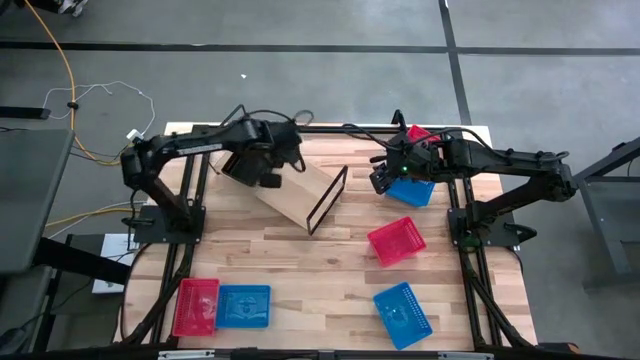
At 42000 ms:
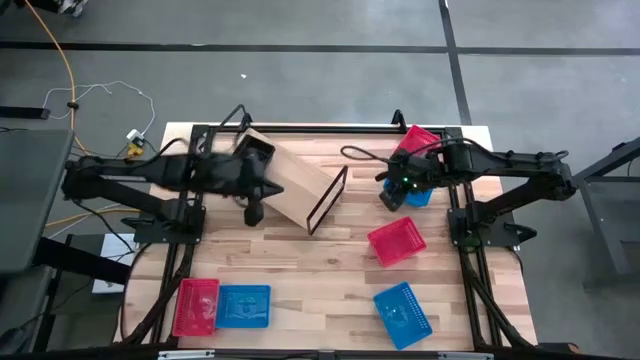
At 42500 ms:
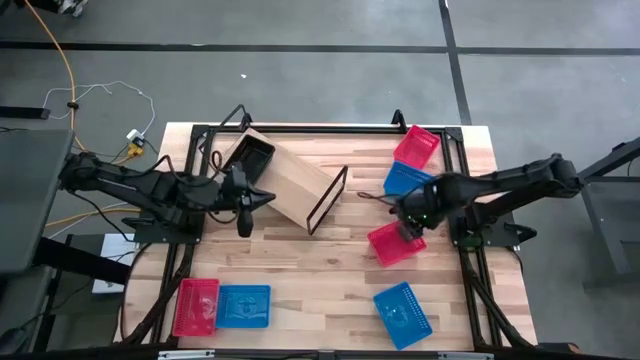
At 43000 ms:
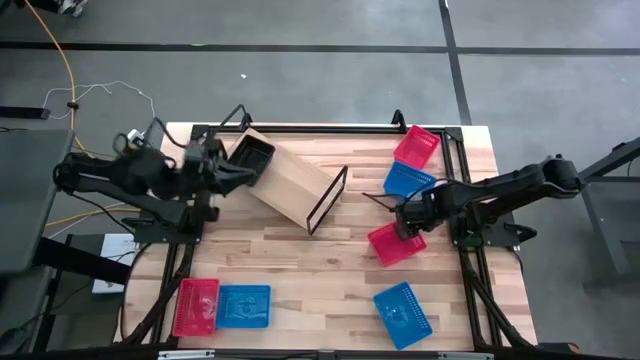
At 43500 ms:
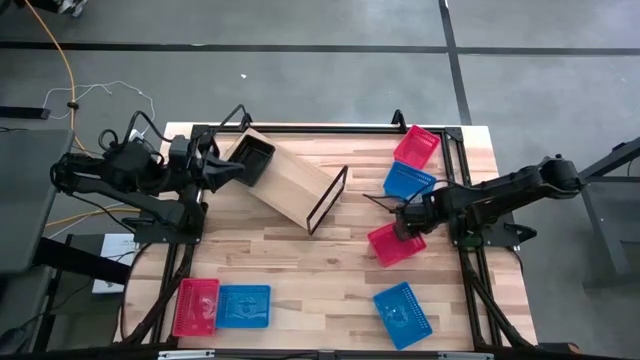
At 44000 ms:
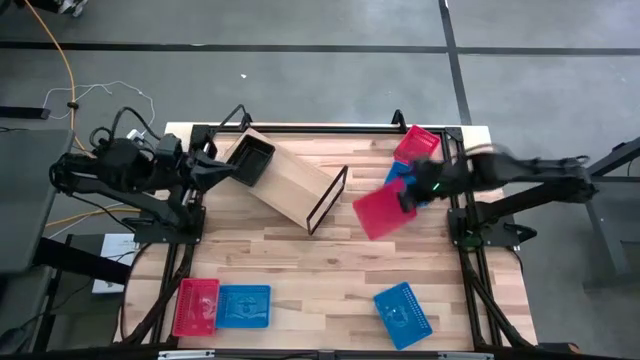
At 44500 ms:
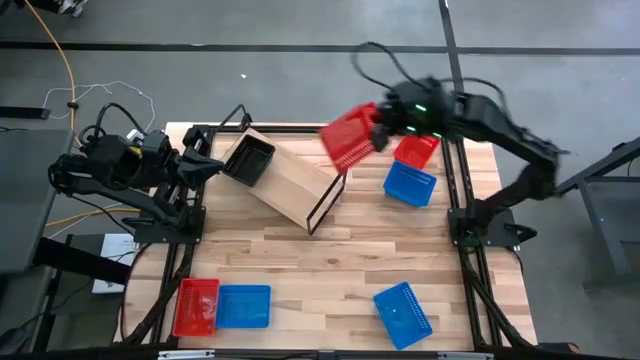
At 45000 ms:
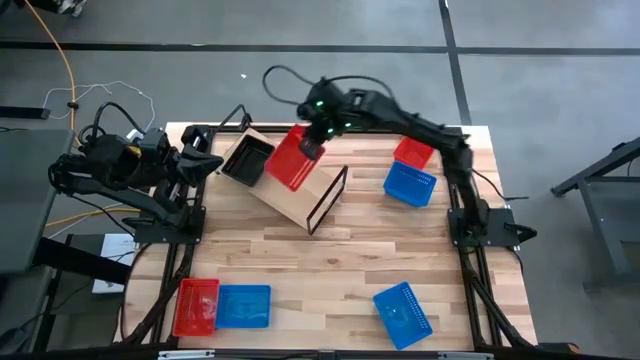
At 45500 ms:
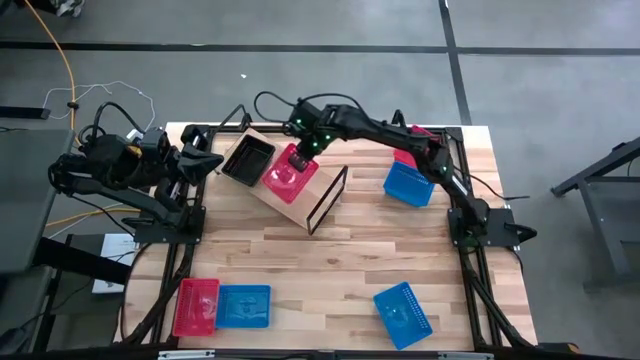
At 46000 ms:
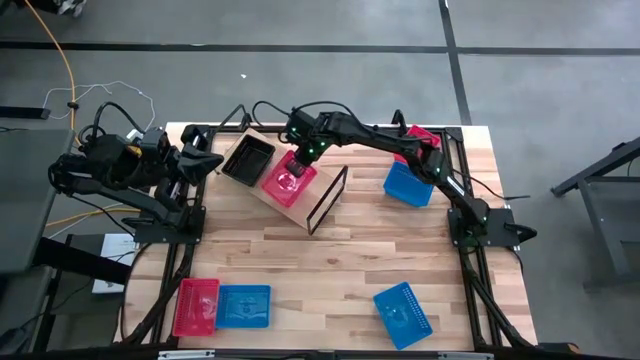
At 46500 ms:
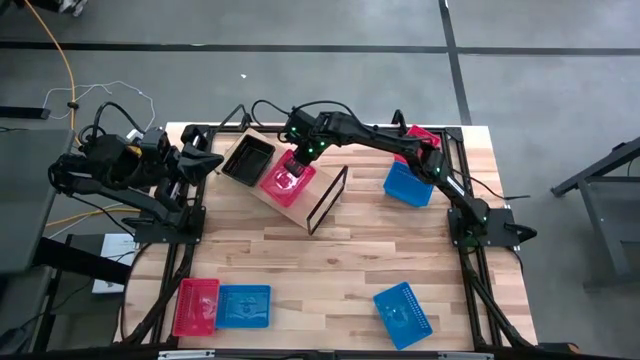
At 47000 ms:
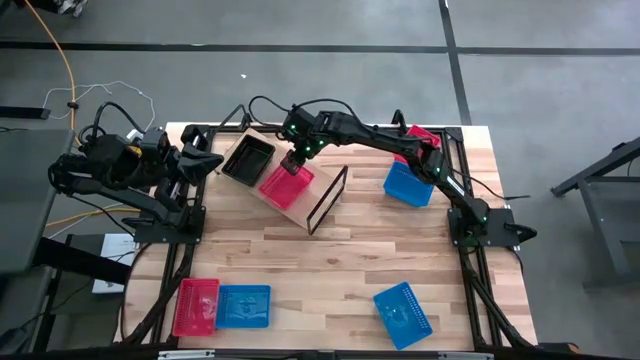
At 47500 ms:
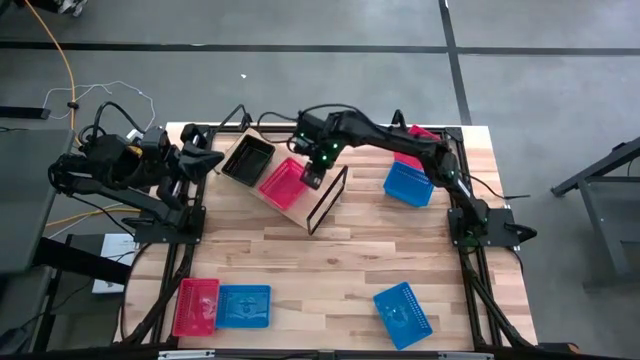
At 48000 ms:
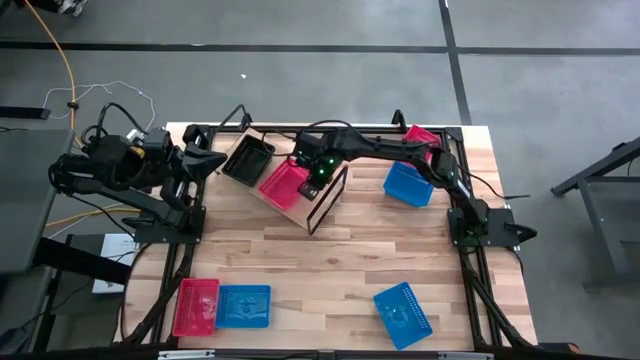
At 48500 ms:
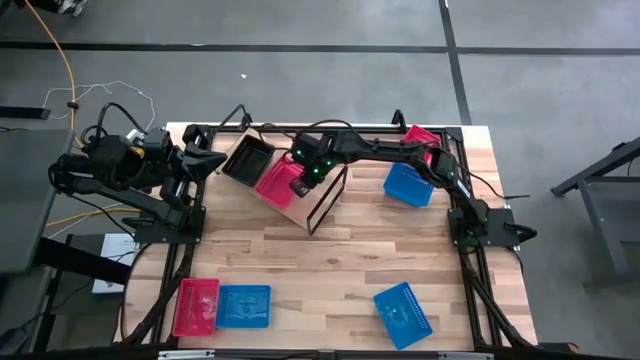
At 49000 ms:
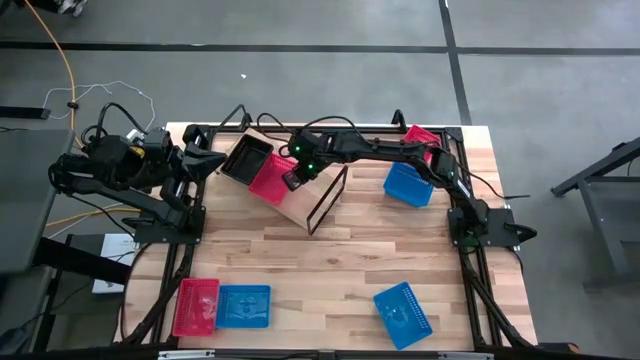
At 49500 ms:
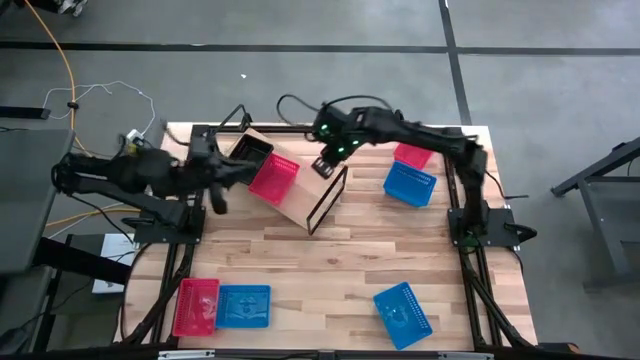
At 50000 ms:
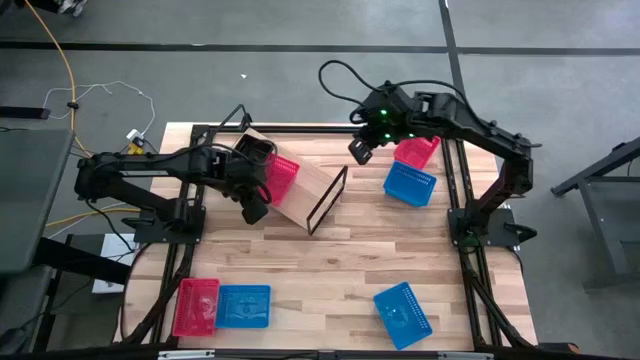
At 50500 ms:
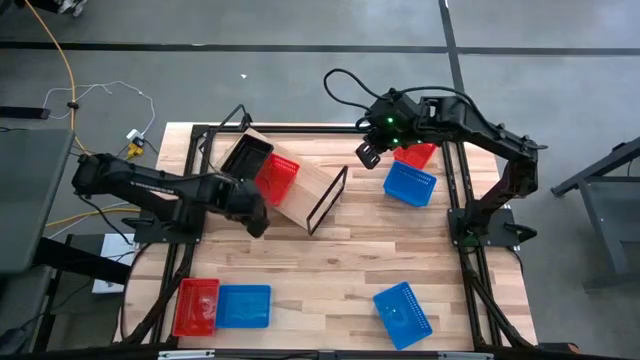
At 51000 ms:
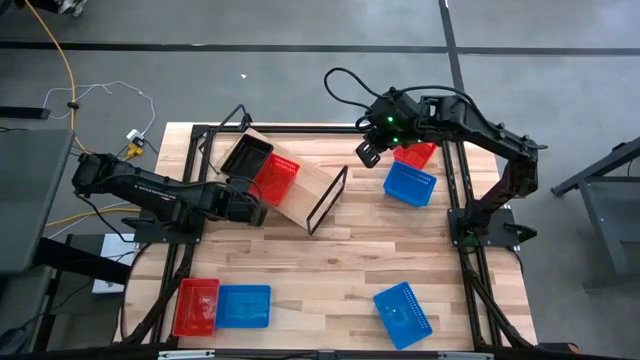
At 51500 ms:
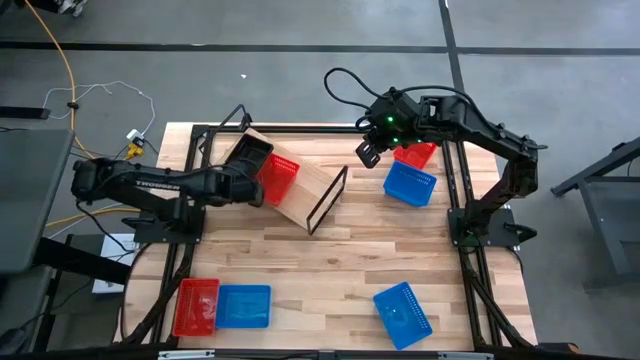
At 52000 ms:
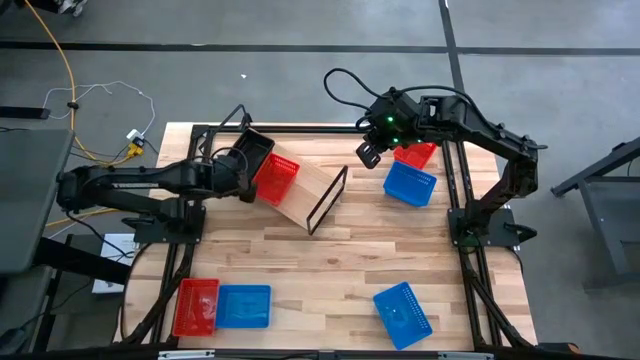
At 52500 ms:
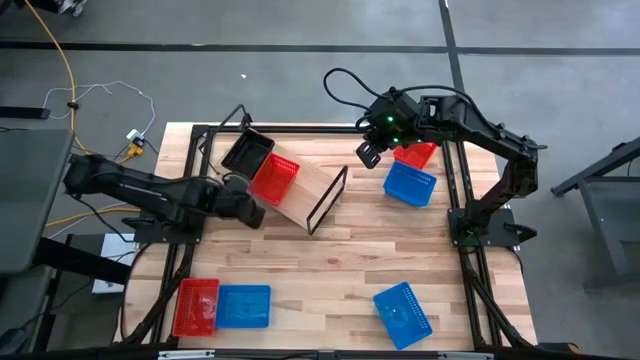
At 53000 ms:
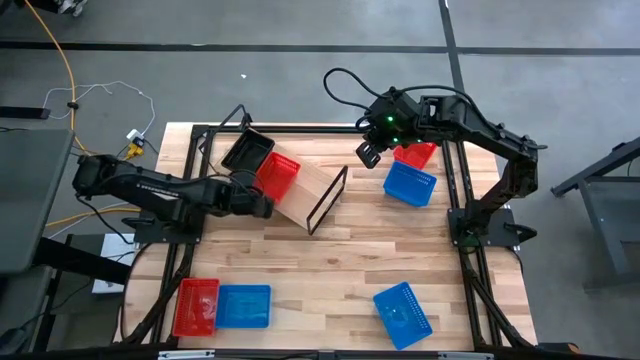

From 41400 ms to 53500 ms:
Task: Stack baskets on shelf by color
Put the middle right red bin on the shelf

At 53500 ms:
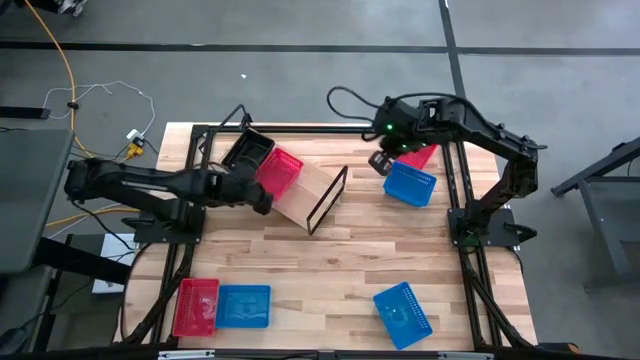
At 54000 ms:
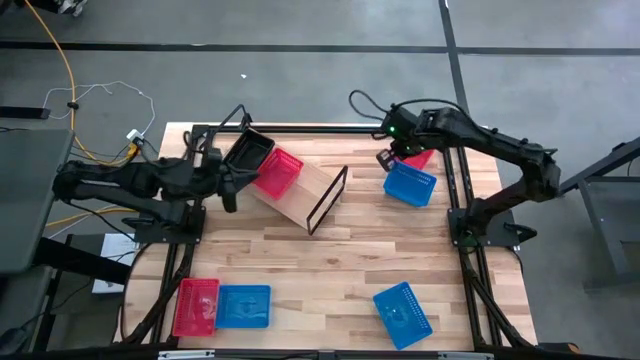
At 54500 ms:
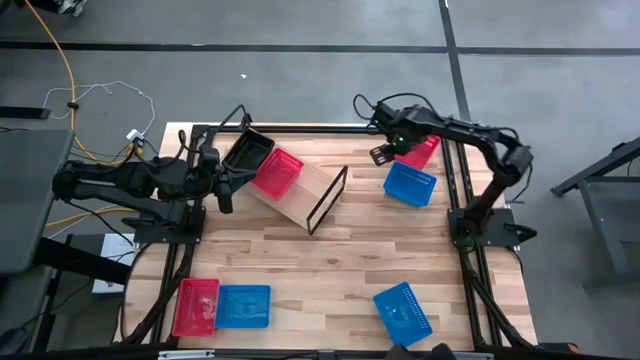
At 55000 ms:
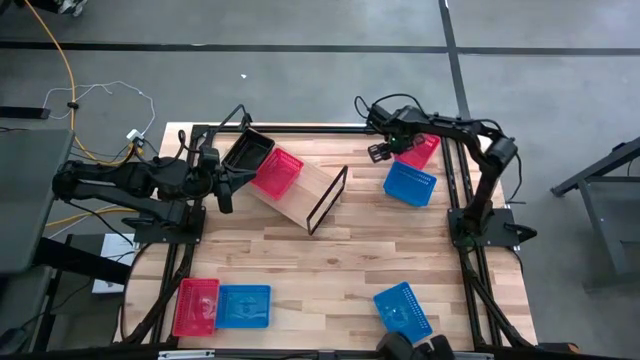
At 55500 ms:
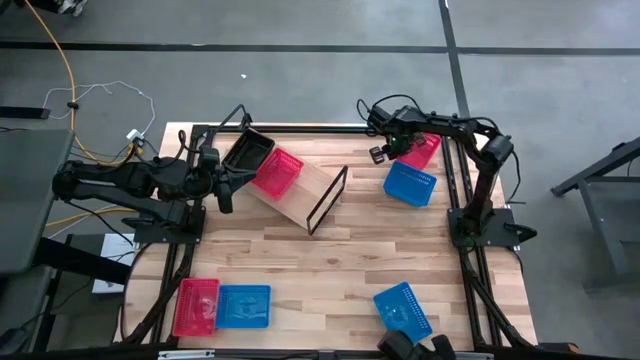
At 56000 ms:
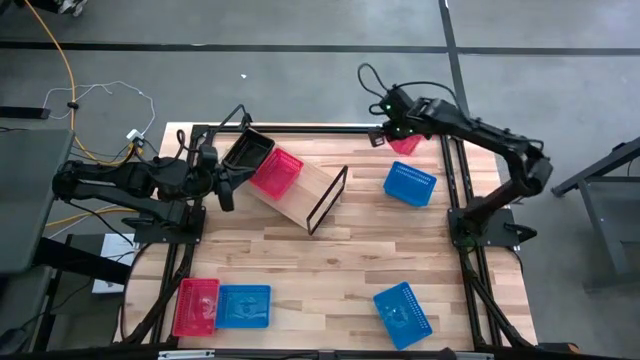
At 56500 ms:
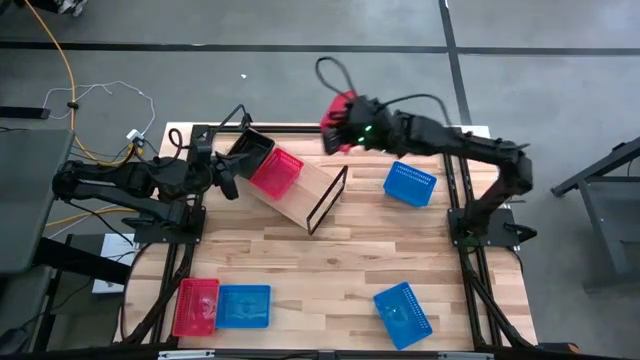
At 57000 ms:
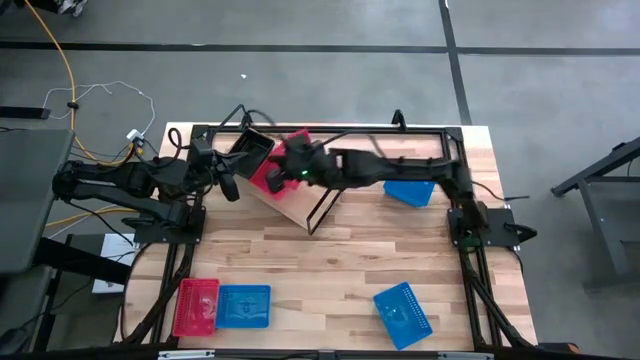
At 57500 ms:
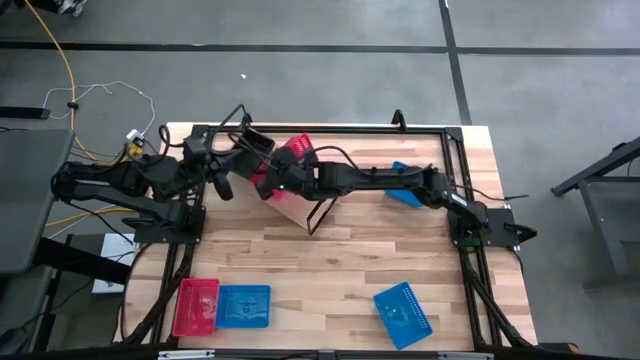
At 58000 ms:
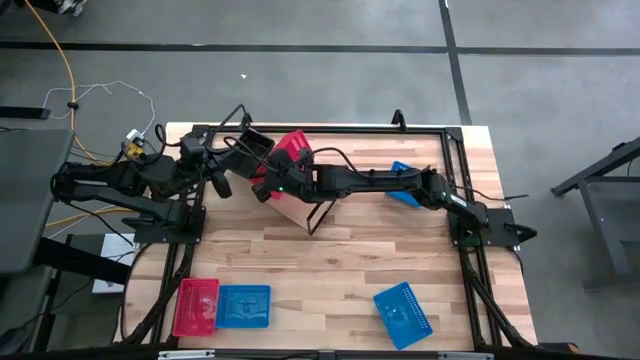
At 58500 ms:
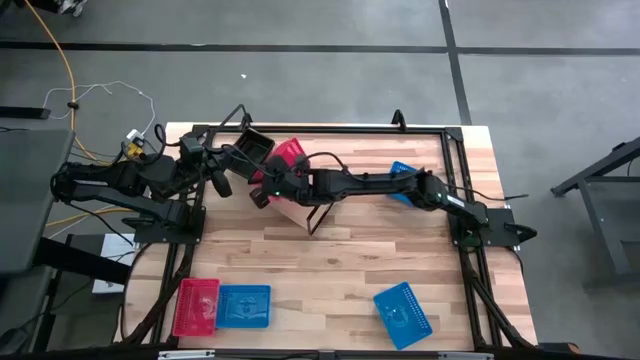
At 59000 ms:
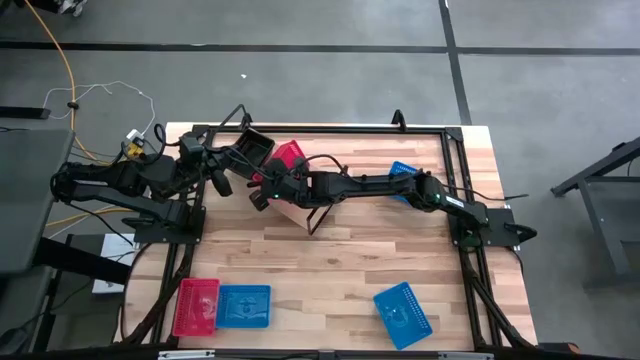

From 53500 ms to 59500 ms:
Stack the top red bin into the red bin on the shelf

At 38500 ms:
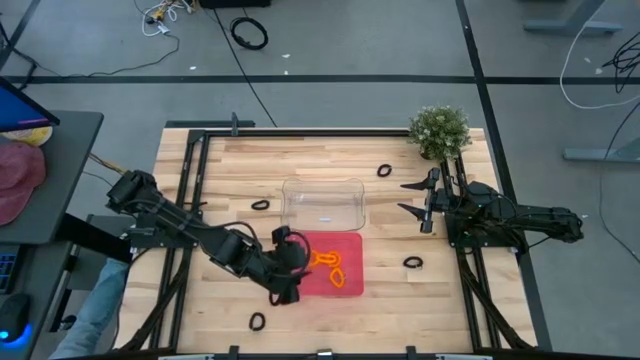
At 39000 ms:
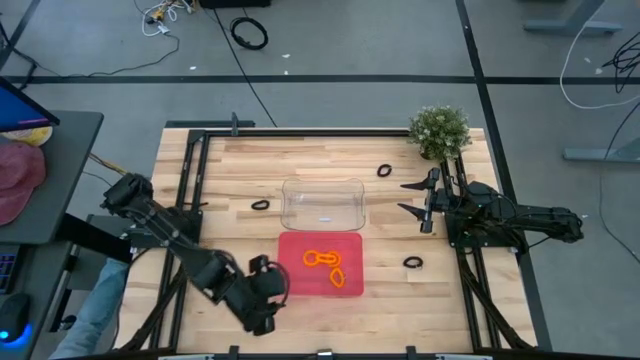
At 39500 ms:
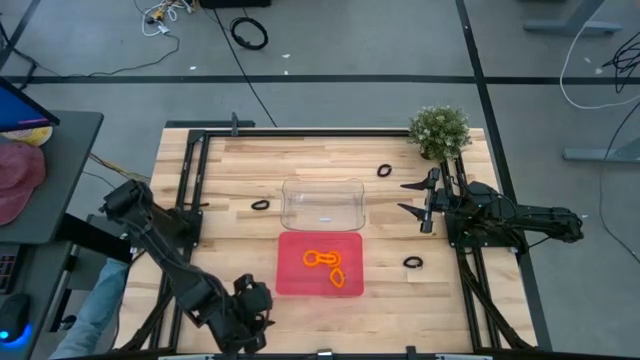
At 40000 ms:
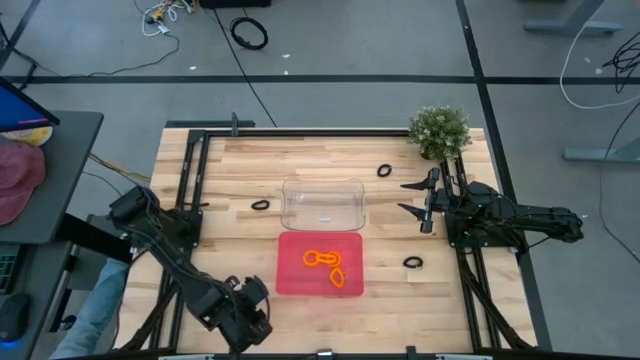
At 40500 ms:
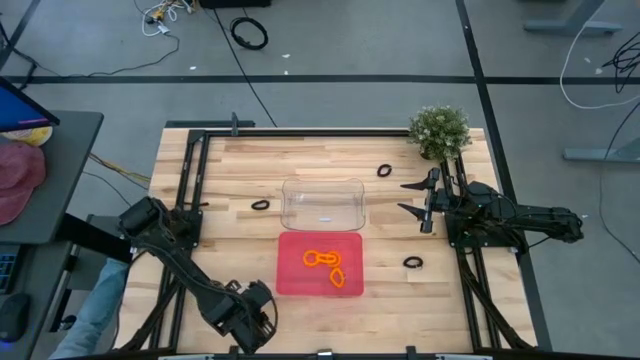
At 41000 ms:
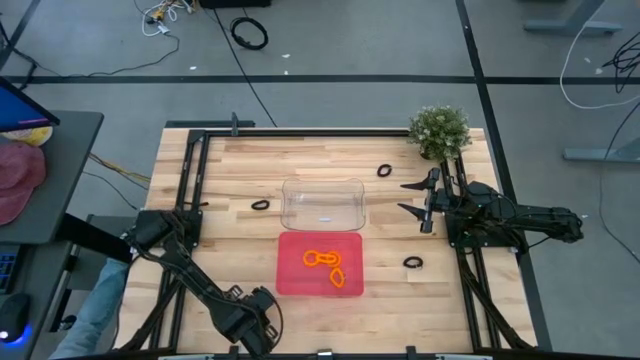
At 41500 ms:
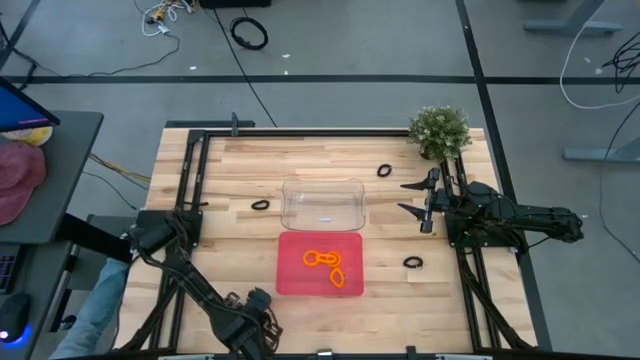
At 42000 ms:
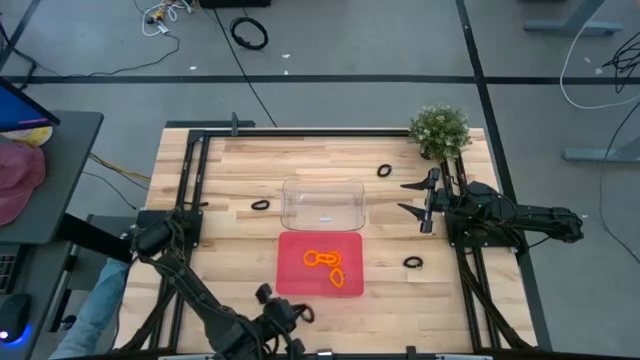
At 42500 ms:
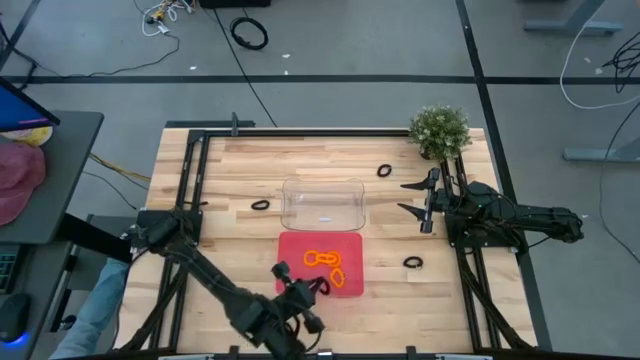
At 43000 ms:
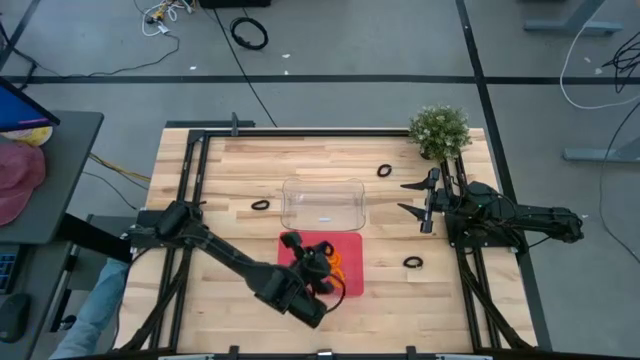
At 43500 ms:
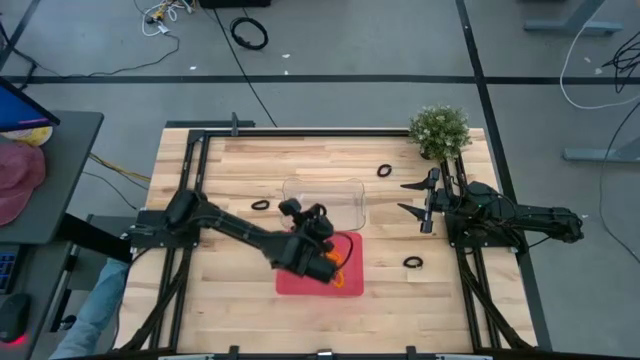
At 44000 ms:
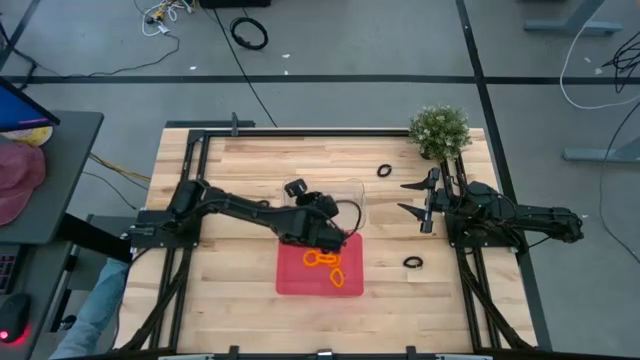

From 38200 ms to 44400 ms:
Task: Sort spring keychains
Put the black spring keychain into the transparent bin
